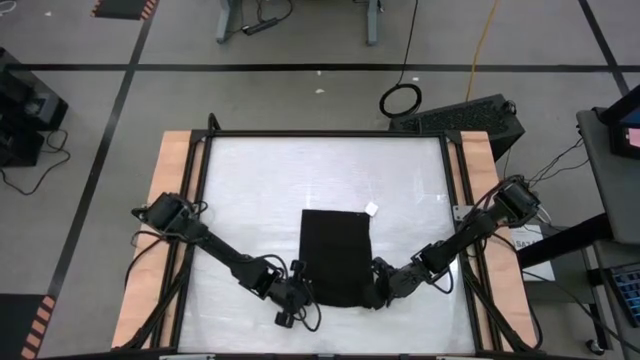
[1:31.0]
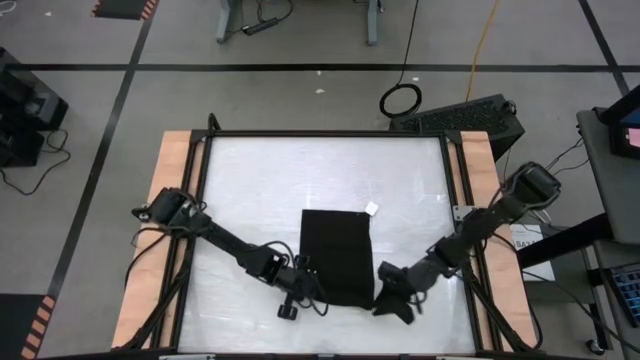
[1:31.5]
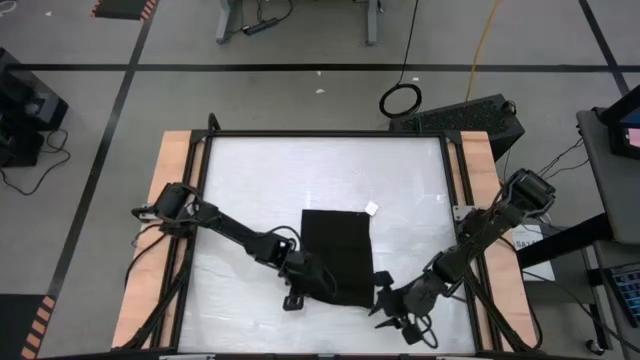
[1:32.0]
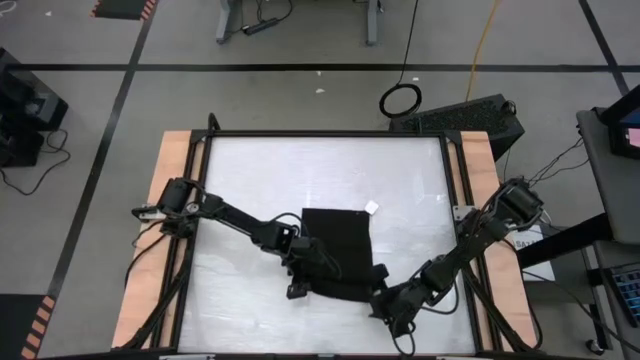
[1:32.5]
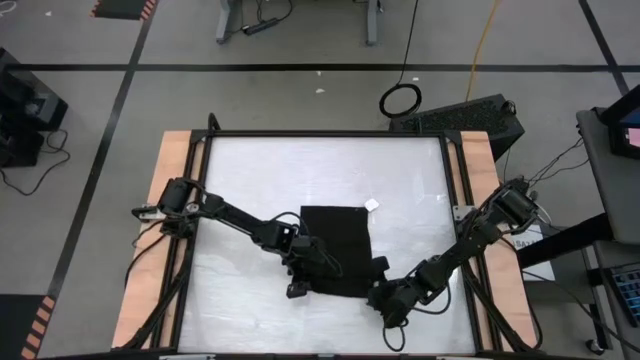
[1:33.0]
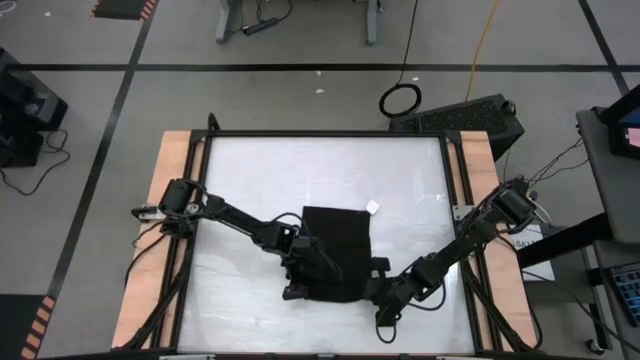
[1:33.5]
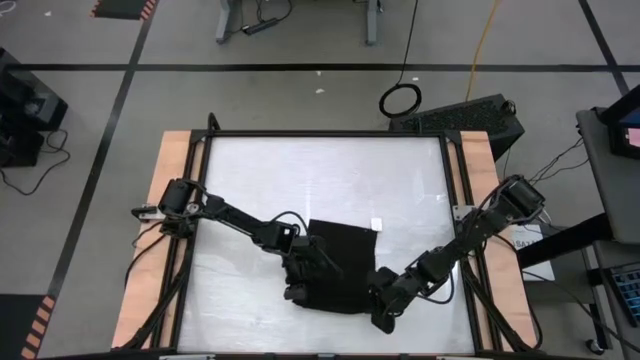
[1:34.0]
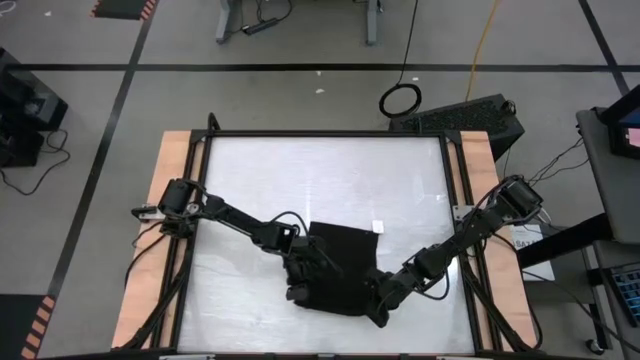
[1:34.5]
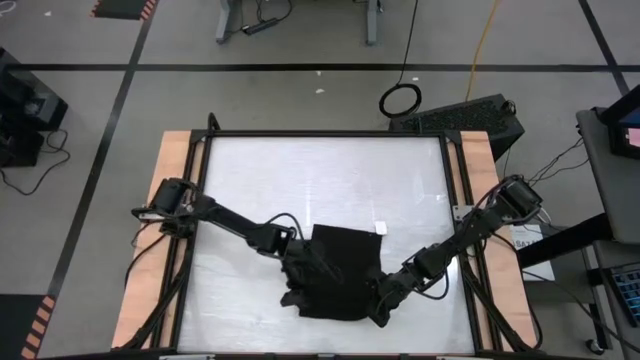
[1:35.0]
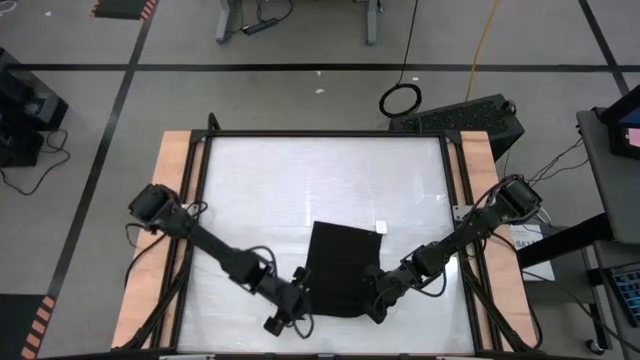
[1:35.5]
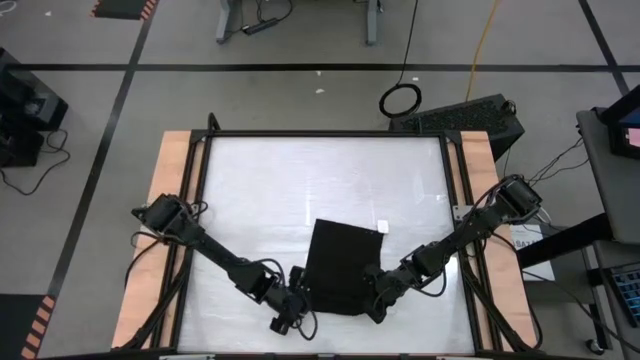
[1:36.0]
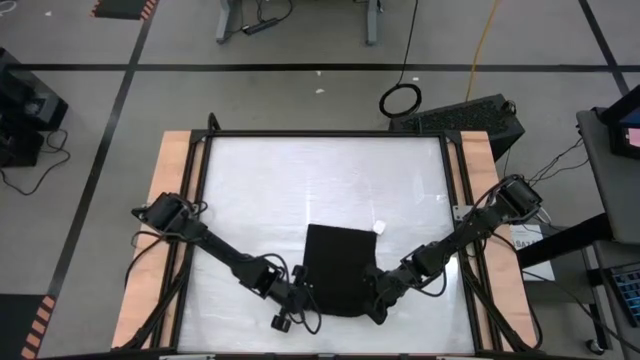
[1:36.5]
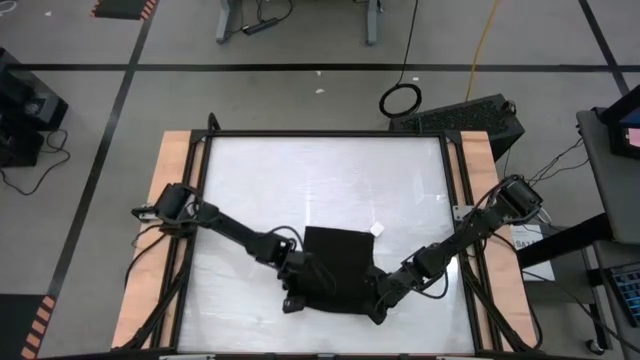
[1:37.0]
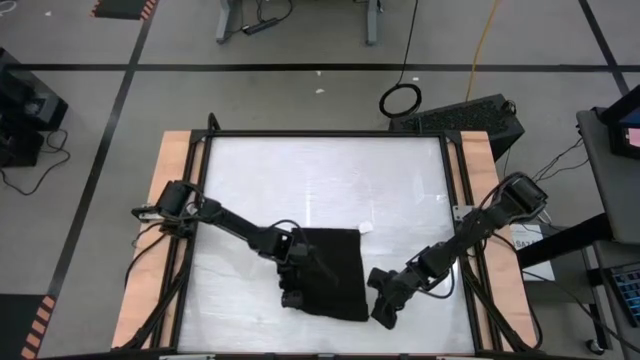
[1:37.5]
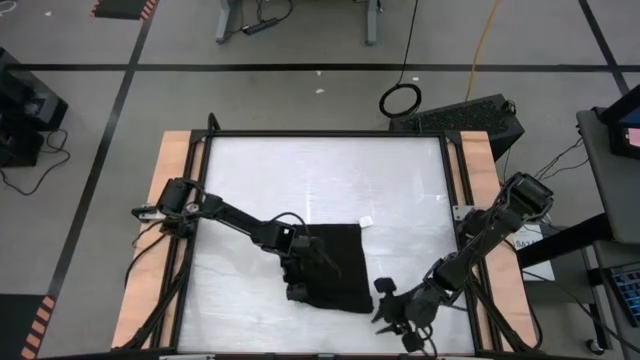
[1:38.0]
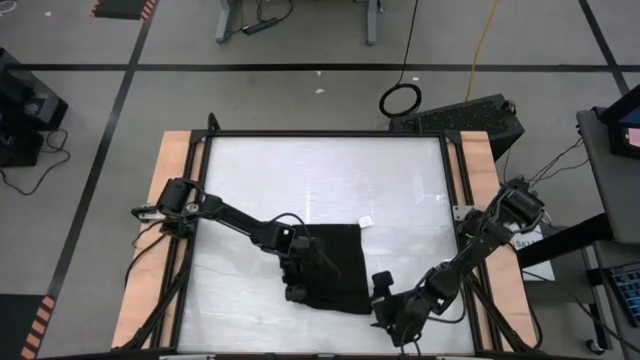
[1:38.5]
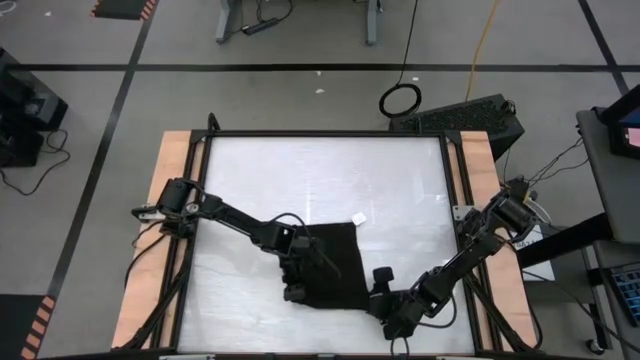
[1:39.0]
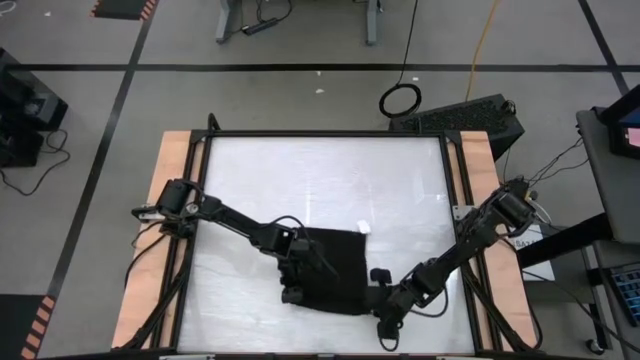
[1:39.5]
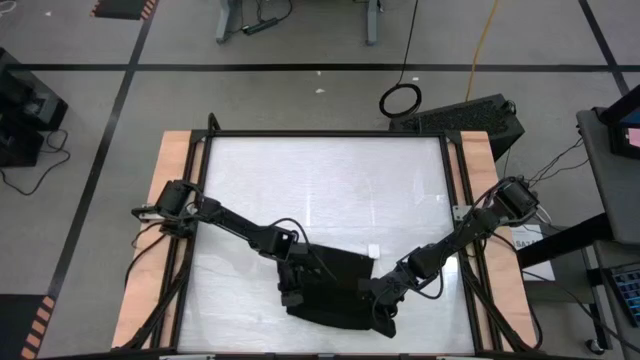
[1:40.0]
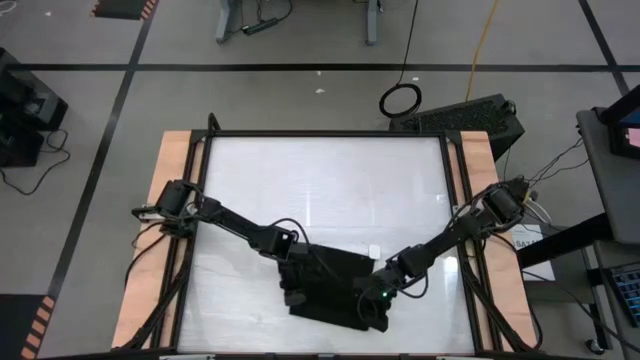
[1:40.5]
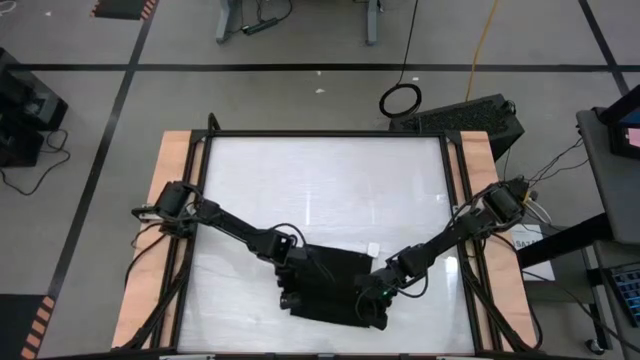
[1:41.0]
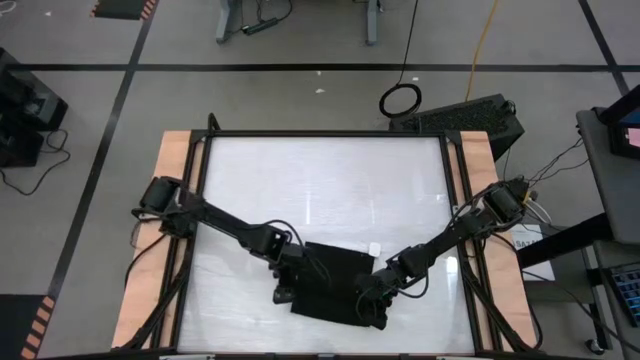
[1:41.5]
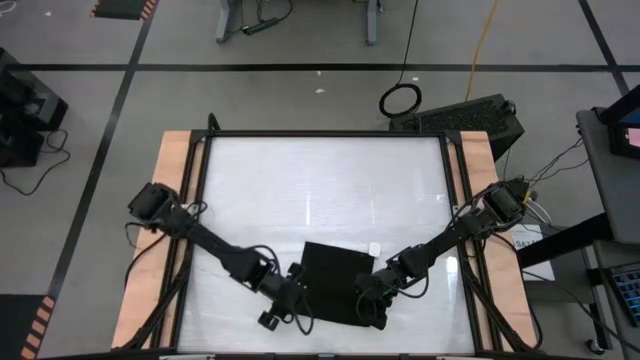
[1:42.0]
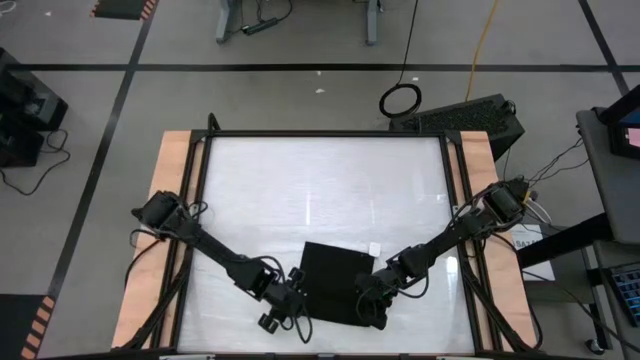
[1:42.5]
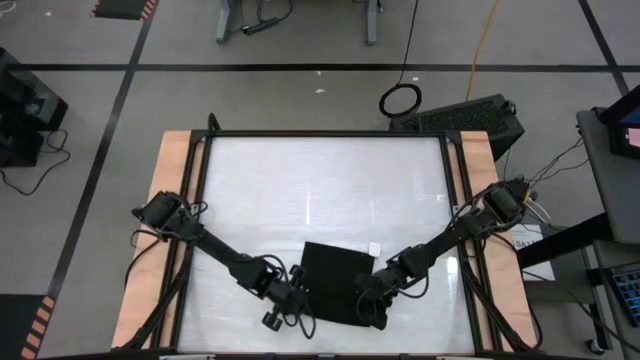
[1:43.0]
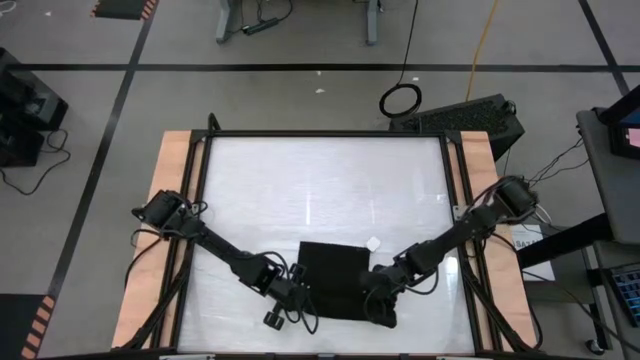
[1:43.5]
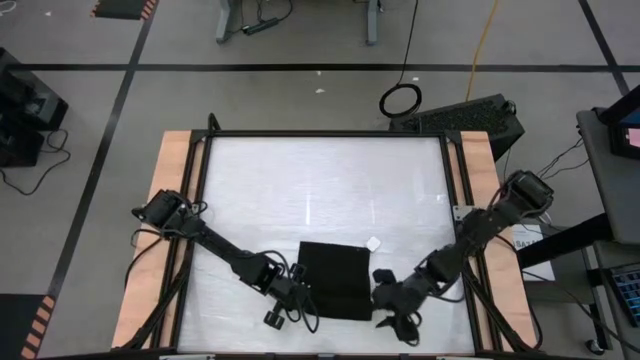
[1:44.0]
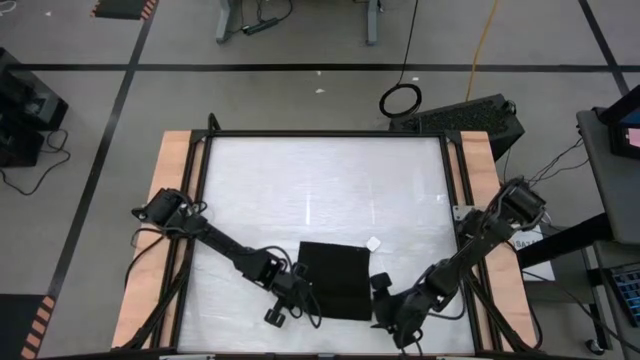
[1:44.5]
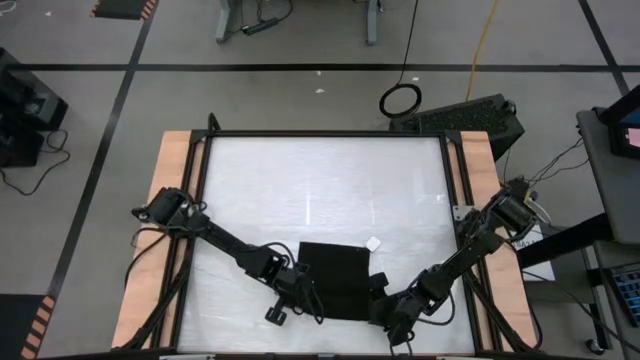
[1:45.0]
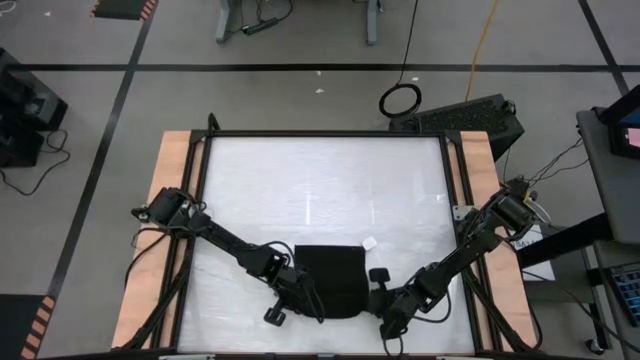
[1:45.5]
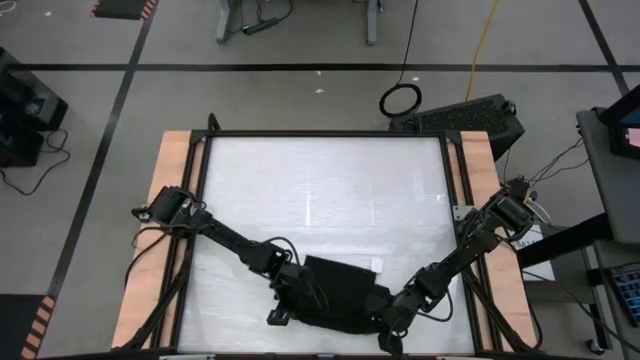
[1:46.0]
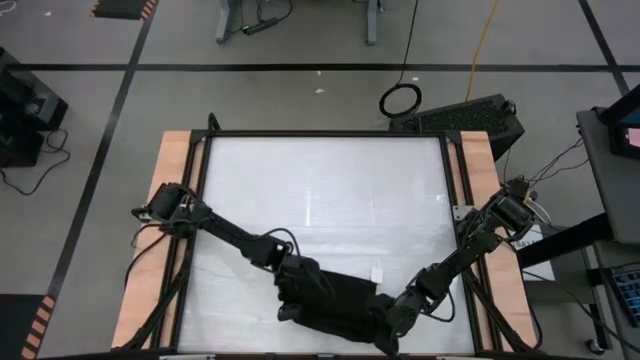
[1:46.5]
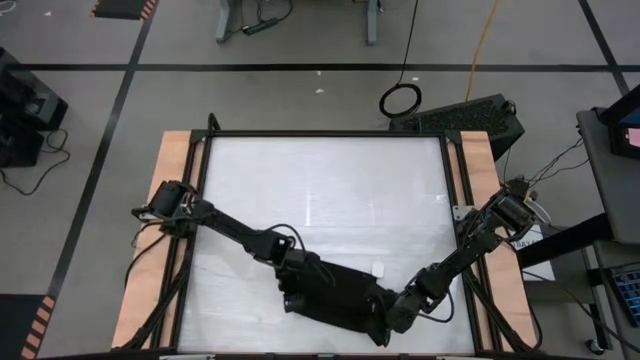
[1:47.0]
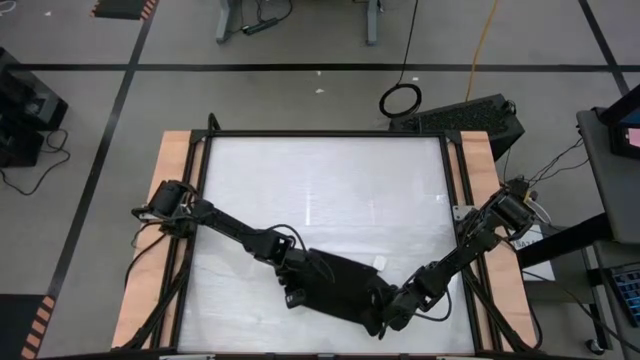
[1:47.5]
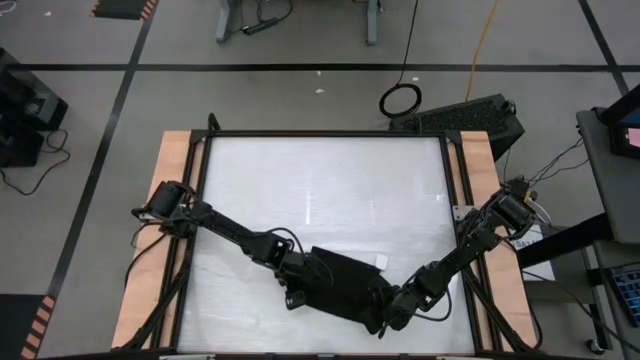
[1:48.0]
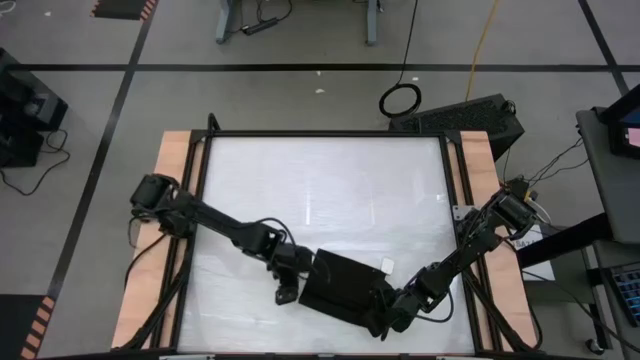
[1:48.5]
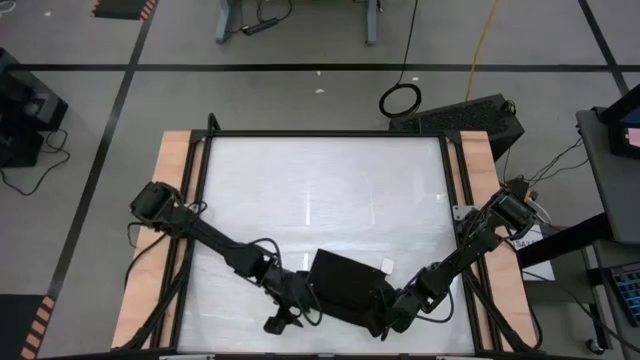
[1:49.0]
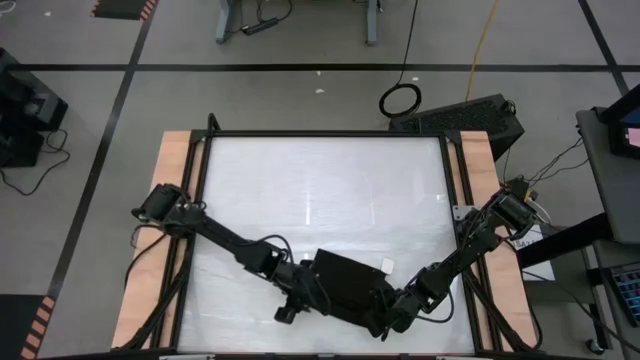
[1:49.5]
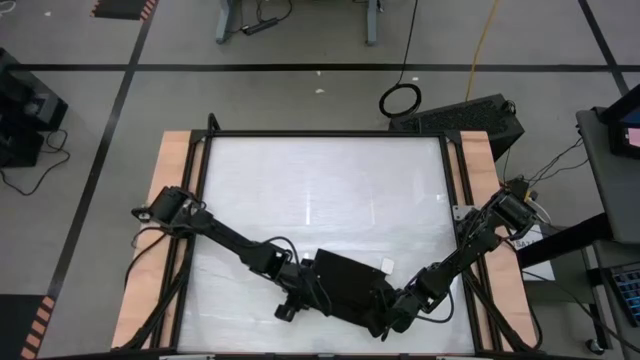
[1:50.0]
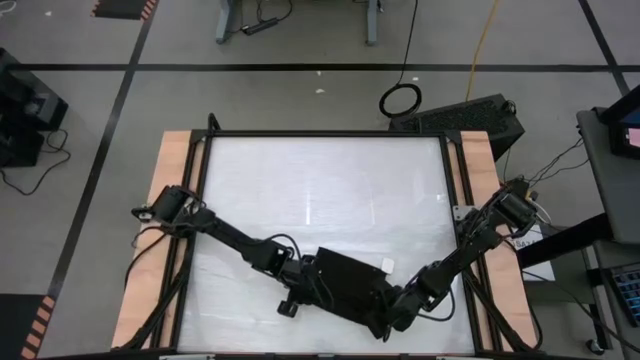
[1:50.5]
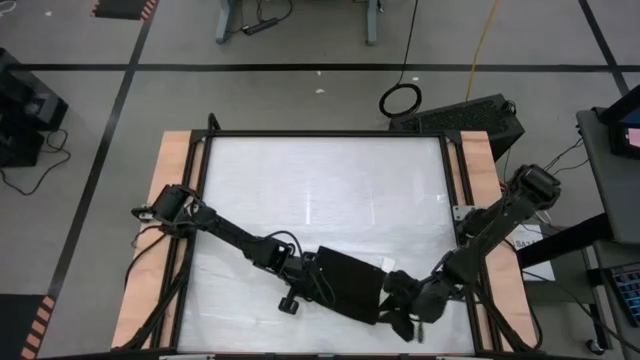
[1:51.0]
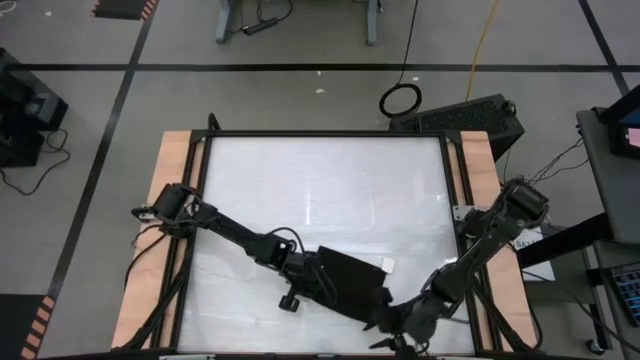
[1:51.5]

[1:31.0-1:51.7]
Task: Roll towel
Roll the black towel
